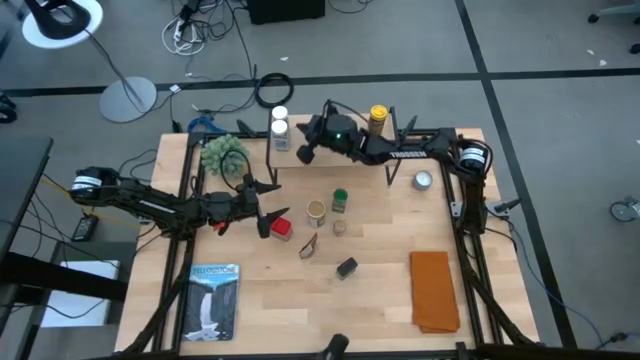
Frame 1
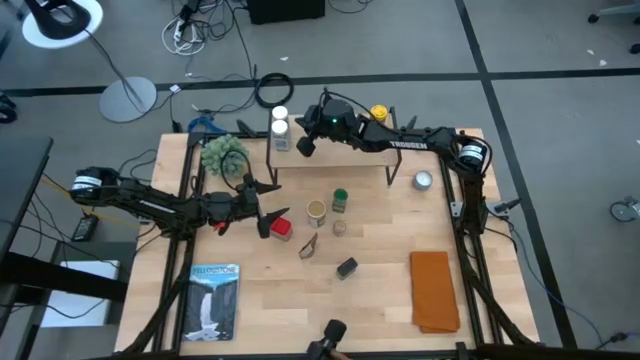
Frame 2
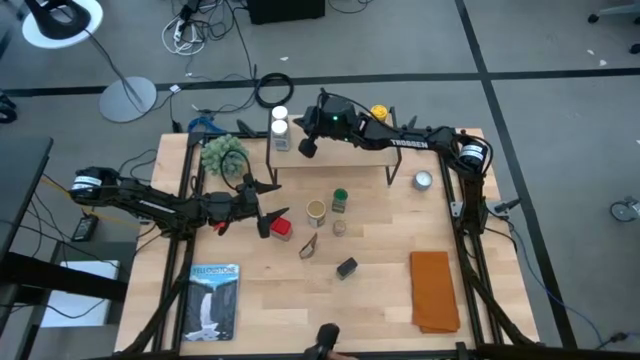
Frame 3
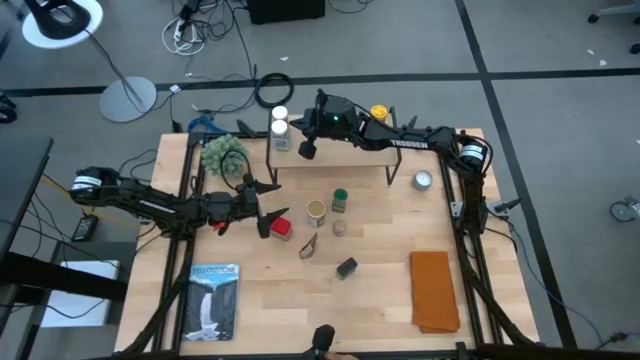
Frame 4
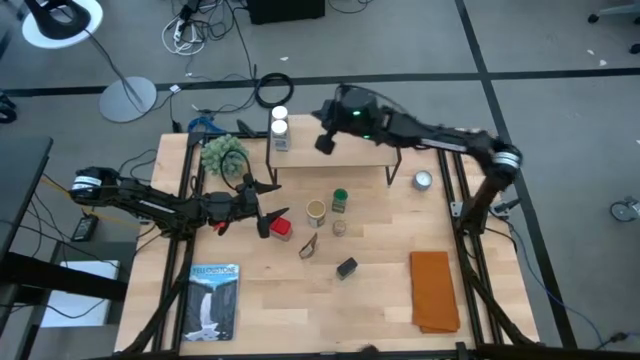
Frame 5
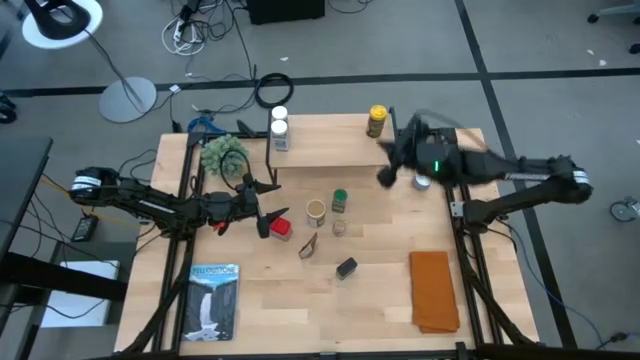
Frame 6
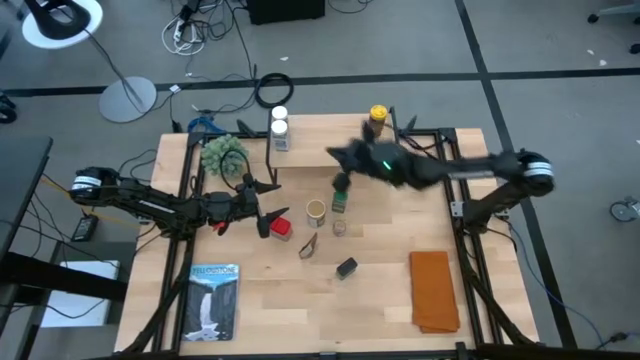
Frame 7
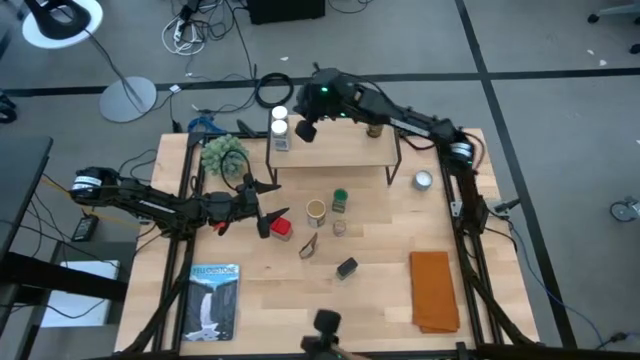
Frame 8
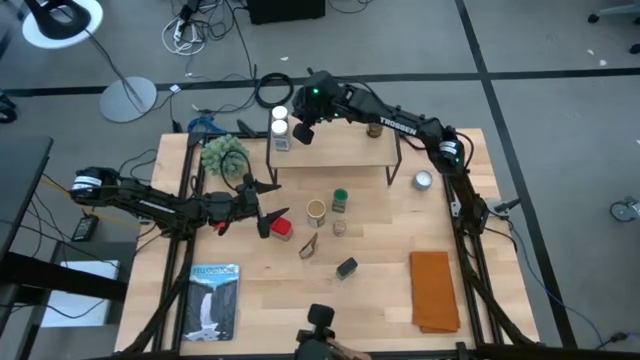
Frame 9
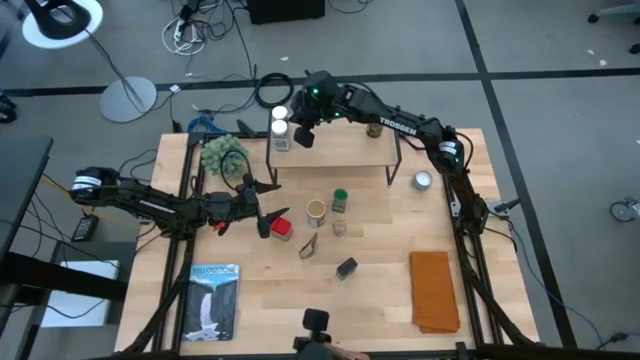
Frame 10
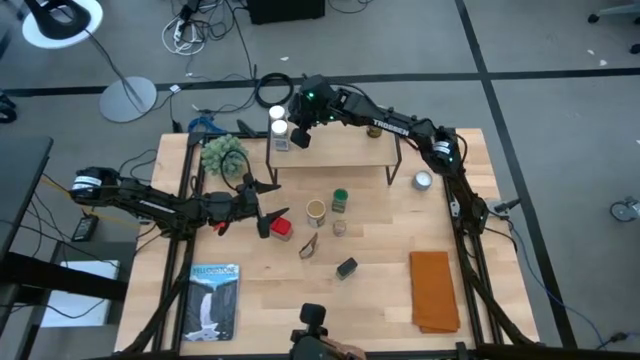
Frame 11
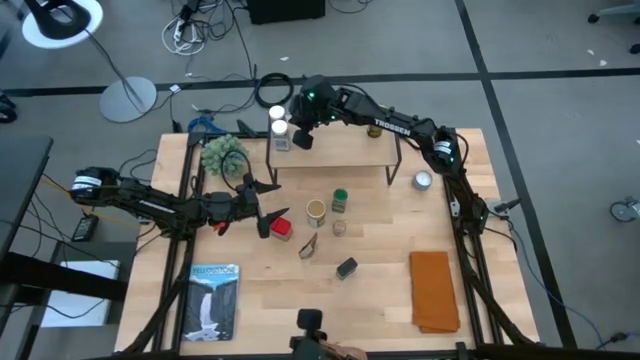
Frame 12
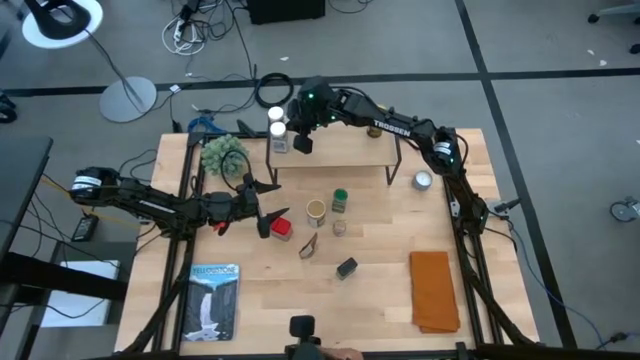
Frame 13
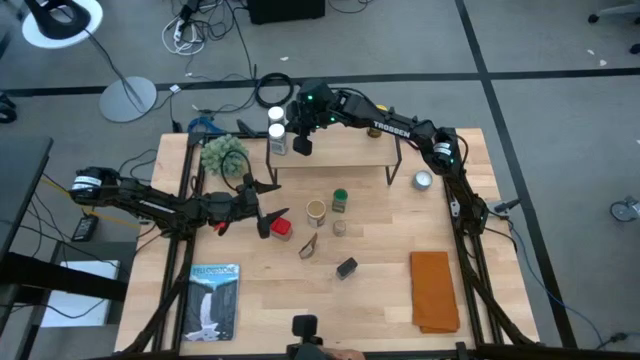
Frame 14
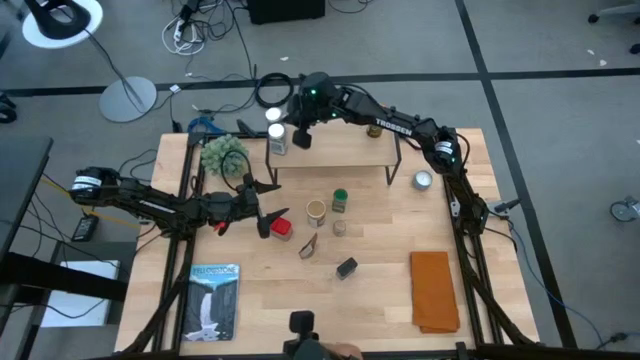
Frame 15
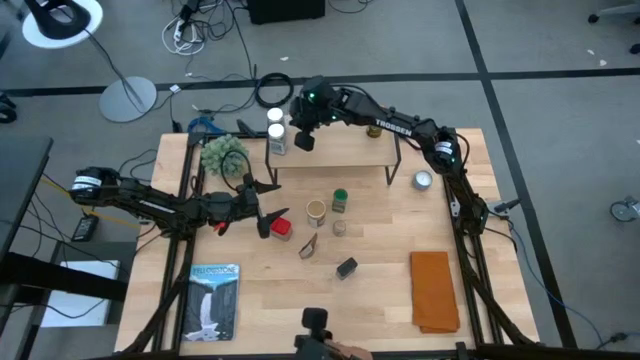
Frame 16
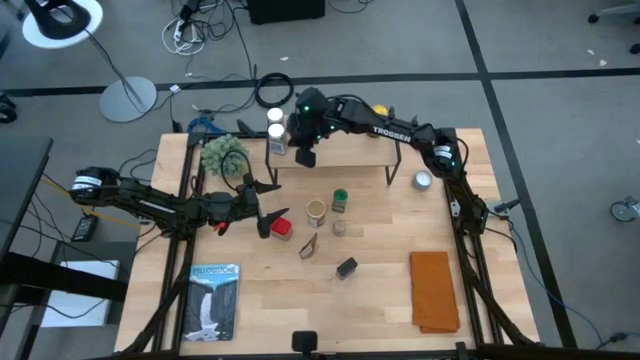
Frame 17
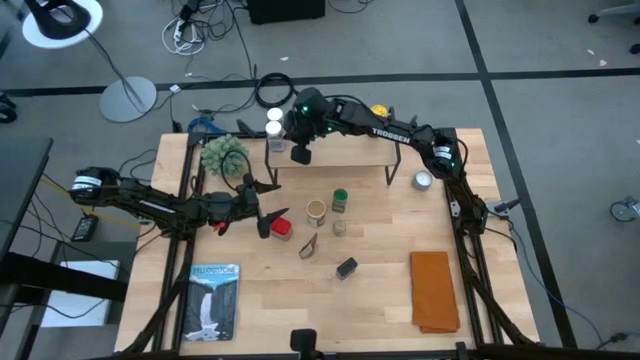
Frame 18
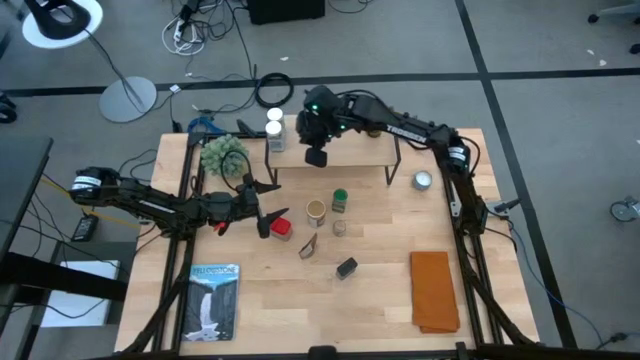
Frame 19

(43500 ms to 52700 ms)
Task: Shelf spices
Adjust the white seasoning bottles on the shelf

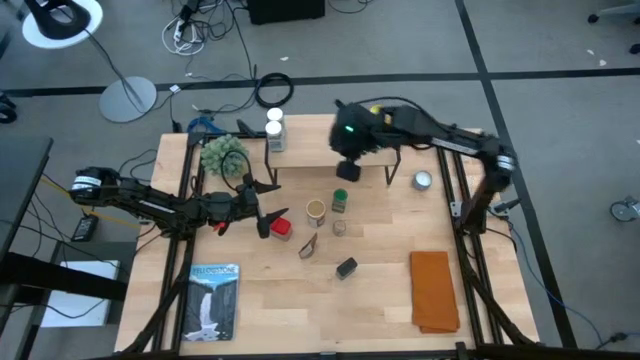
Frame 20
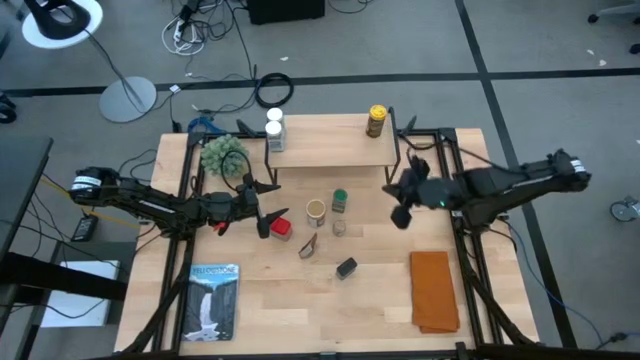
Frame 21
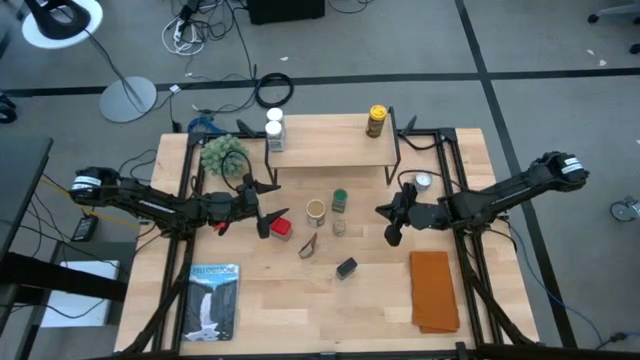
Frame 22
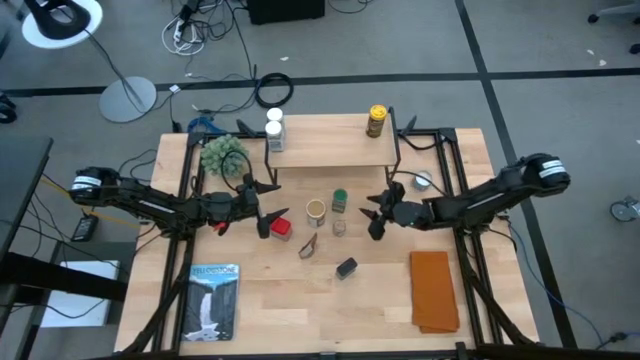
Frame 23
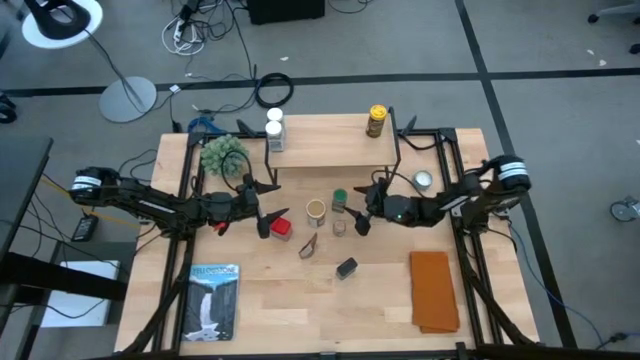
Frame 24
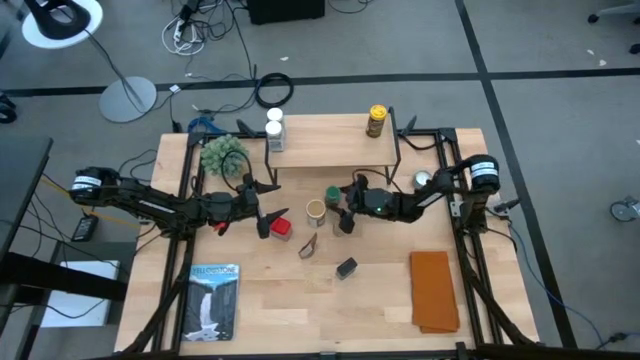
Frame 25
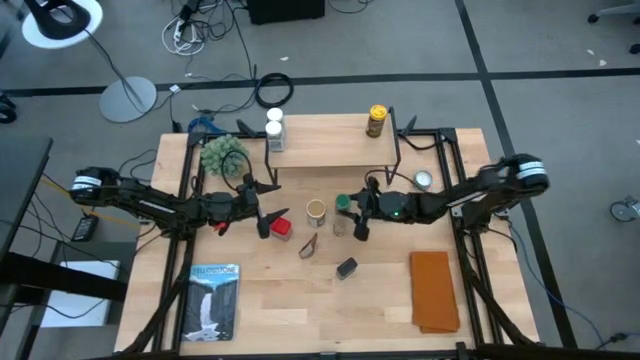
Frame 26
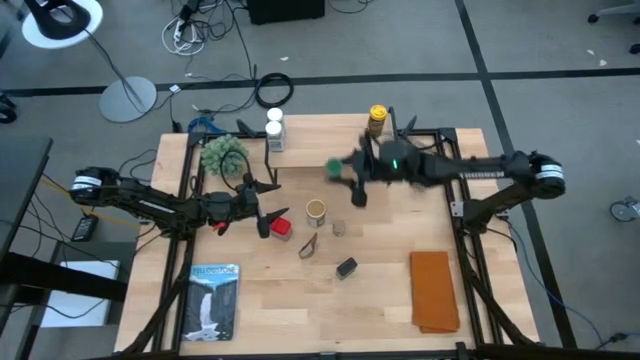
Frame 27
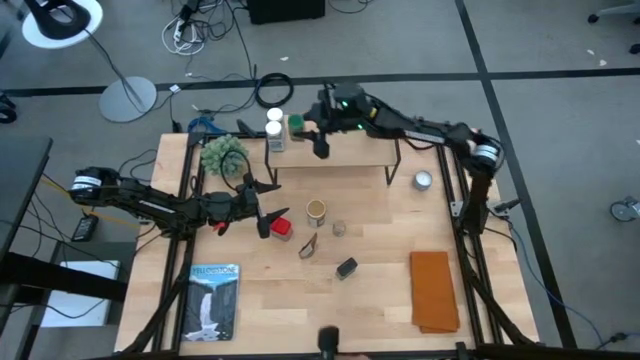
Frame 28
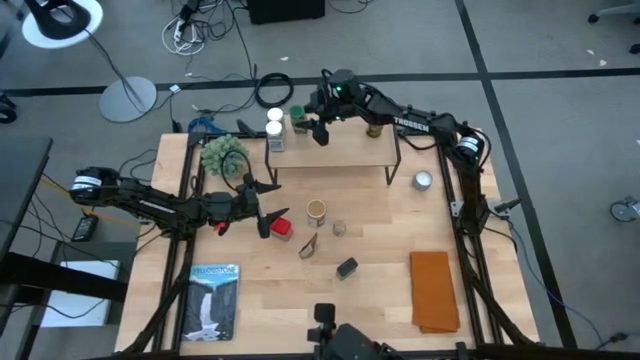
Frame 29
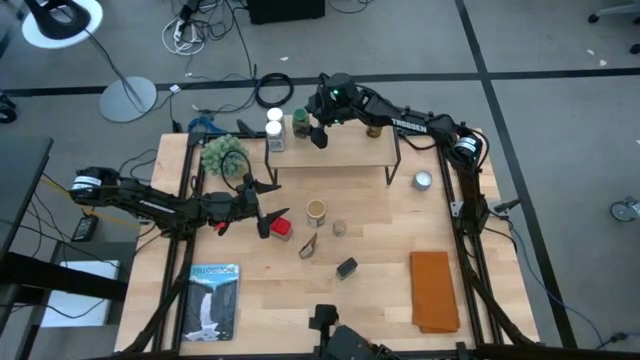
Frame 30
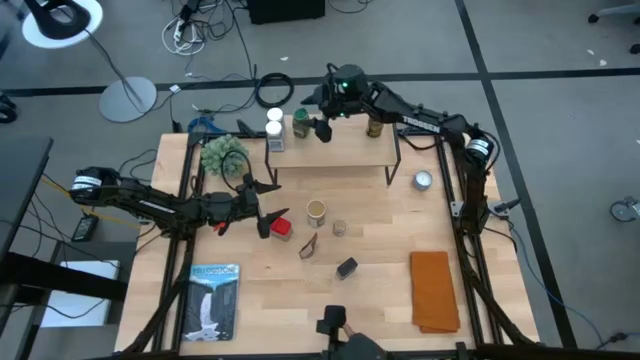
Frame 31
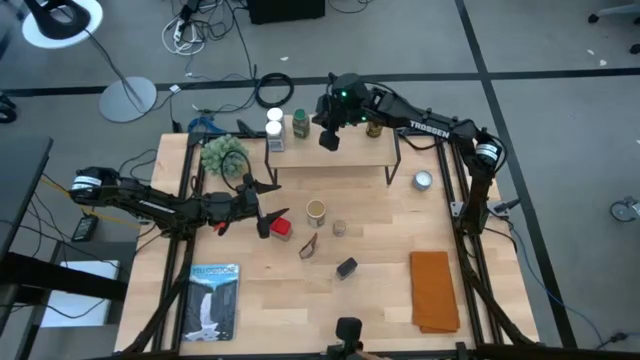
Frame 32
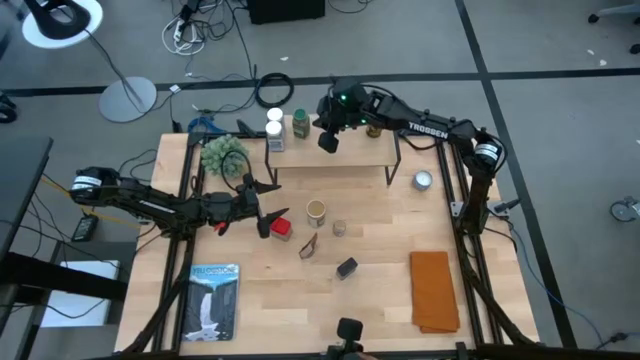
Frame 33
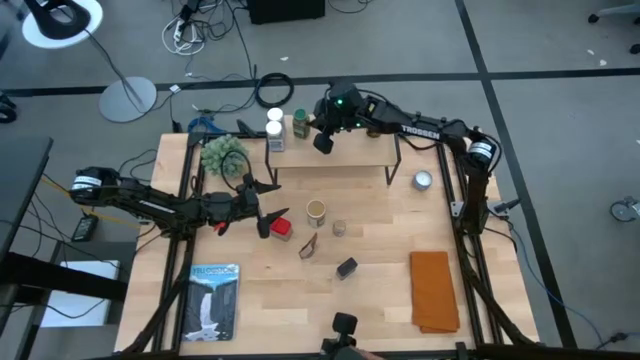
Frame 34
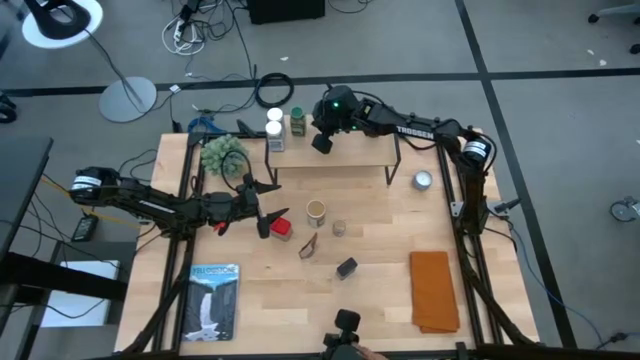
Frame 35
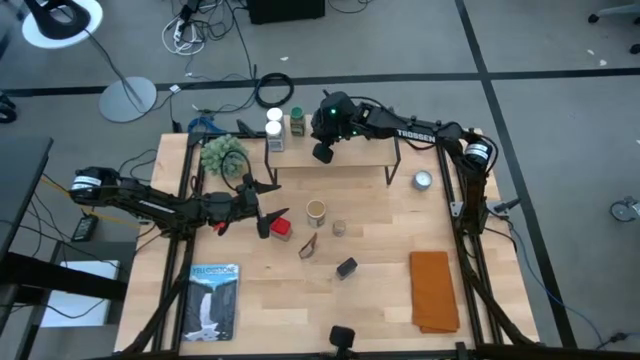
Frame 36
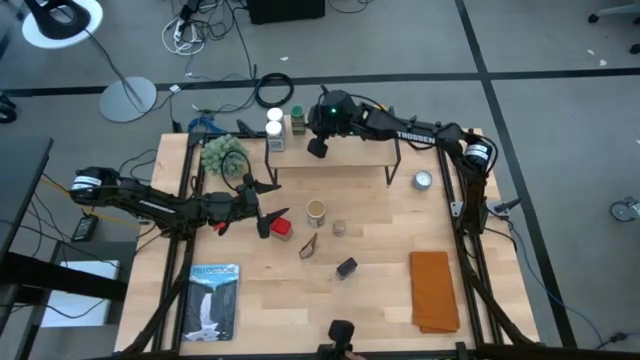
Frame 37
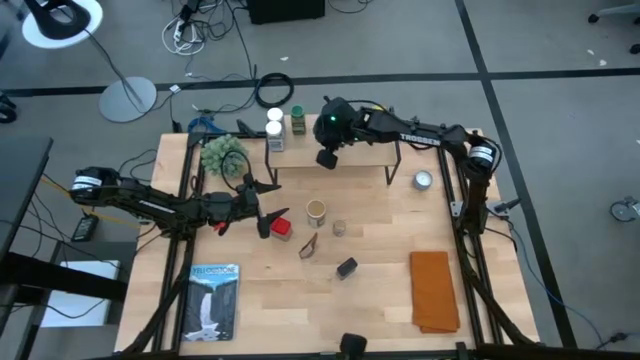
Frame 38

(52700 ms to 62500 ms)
Put the green seasoning bottle on the shelf

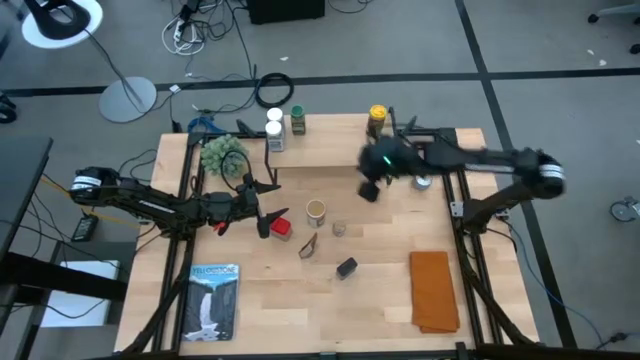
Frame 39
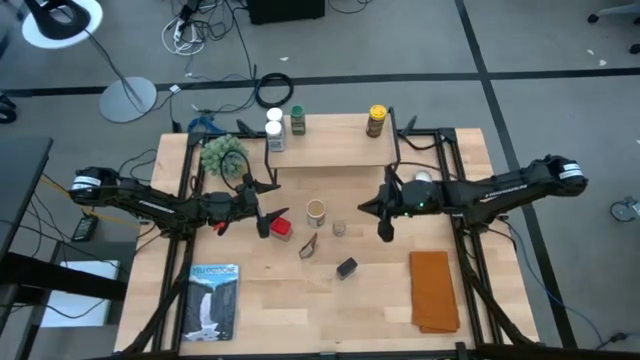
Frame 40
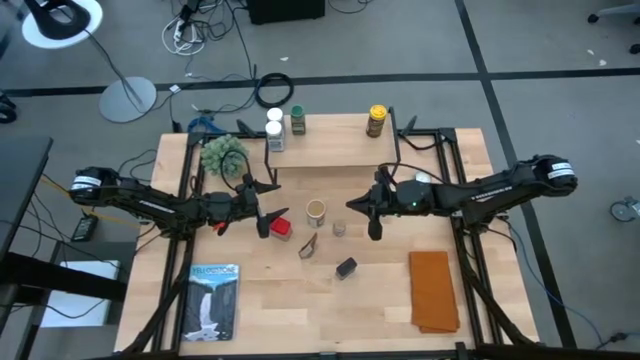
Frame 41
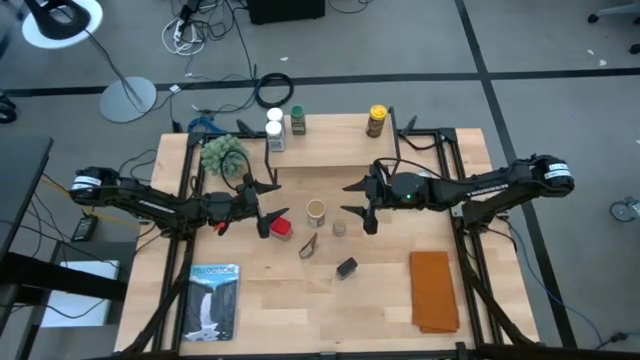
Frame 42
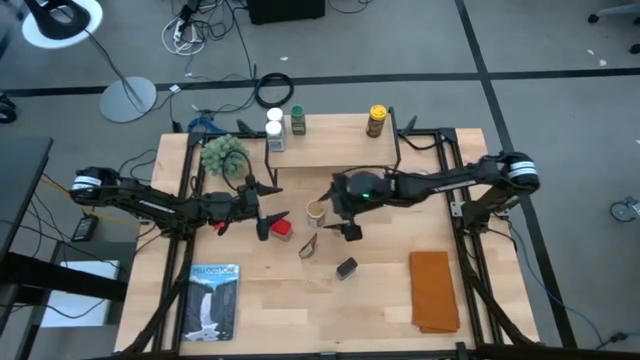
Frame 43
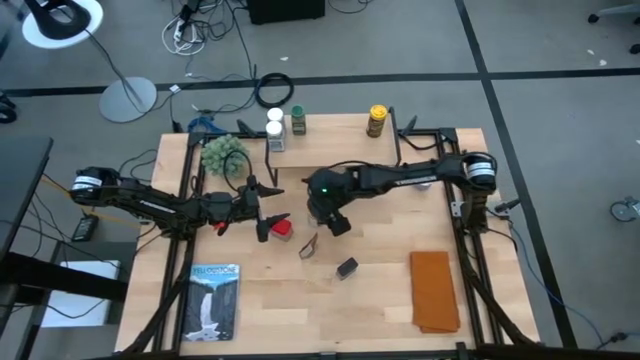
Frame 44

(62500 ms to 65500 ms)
Put the gold seasoning bottle on the shelf
